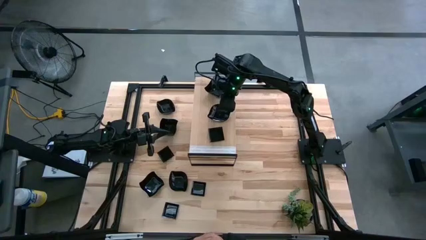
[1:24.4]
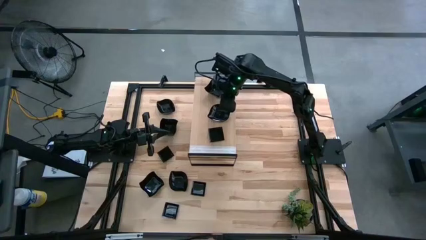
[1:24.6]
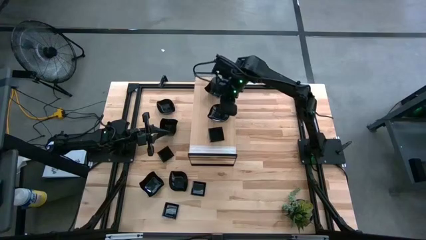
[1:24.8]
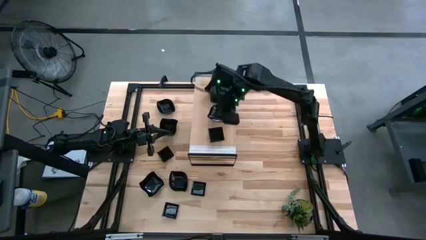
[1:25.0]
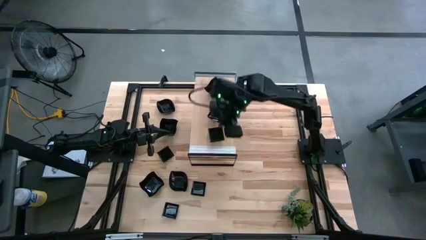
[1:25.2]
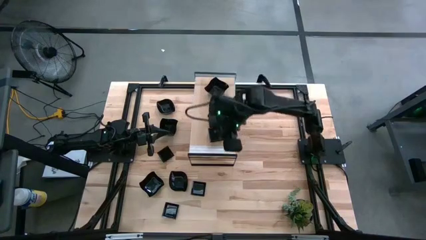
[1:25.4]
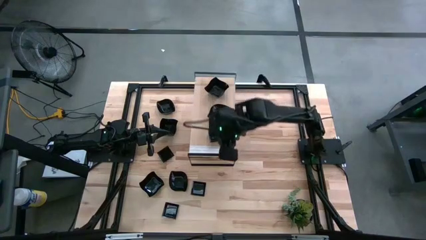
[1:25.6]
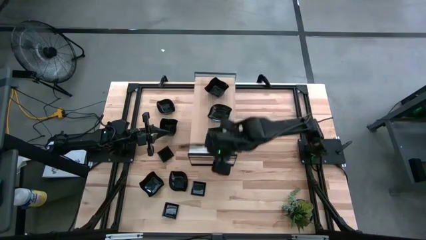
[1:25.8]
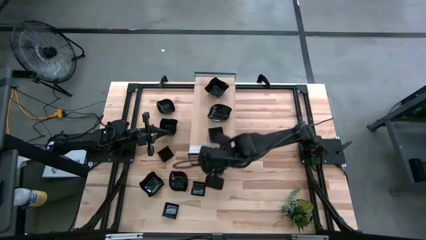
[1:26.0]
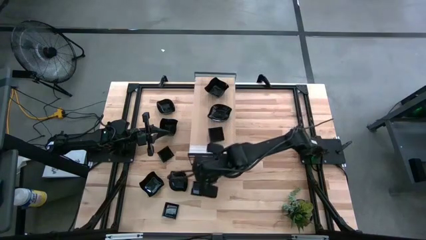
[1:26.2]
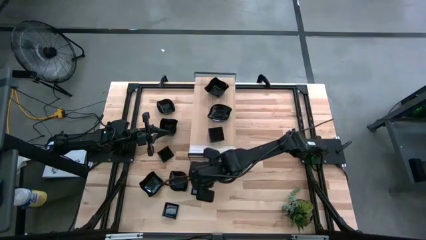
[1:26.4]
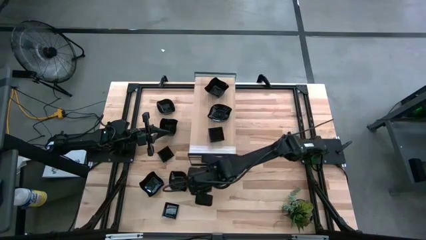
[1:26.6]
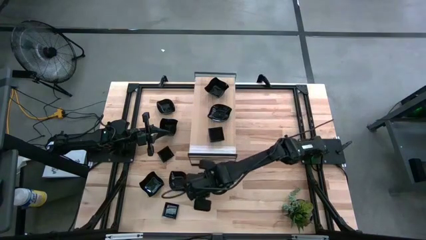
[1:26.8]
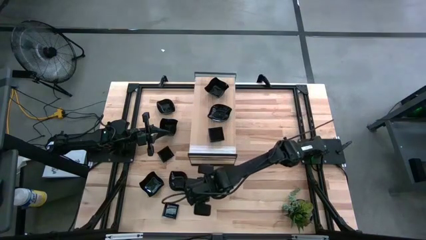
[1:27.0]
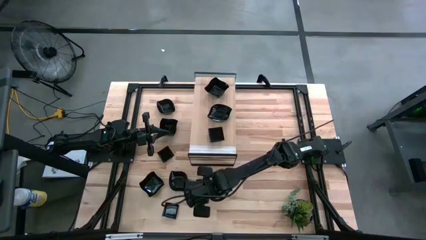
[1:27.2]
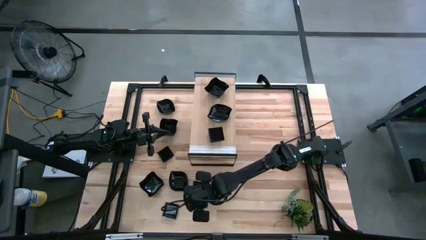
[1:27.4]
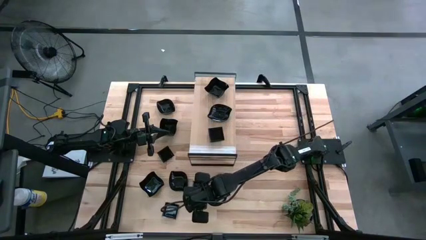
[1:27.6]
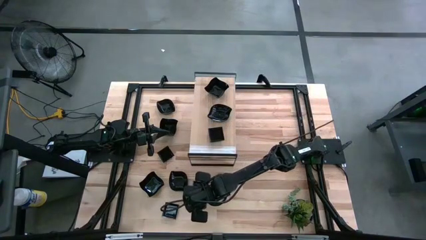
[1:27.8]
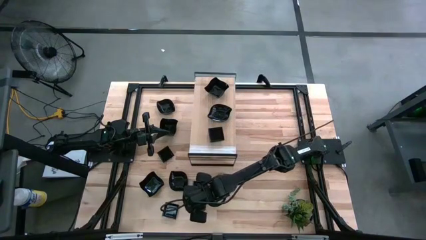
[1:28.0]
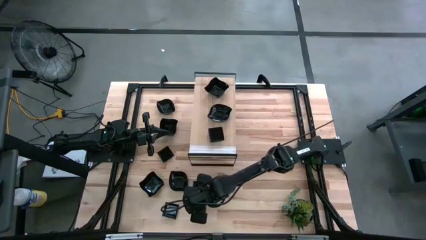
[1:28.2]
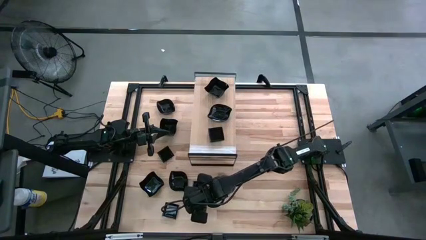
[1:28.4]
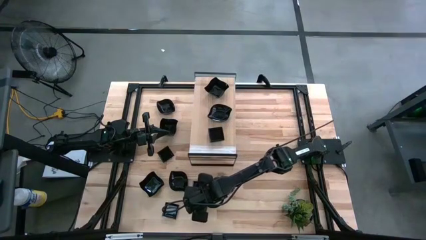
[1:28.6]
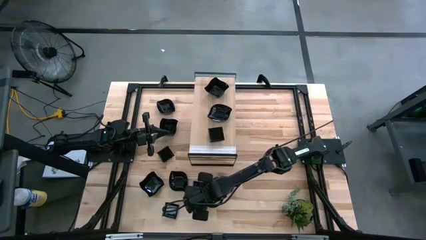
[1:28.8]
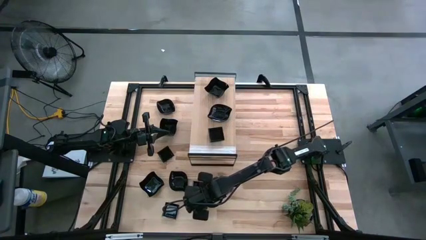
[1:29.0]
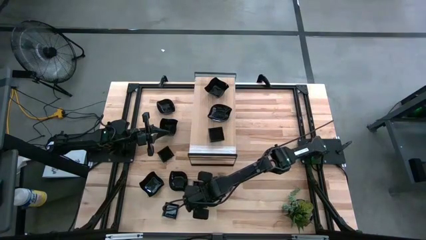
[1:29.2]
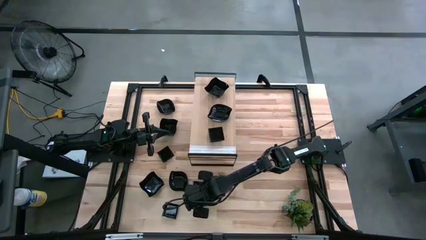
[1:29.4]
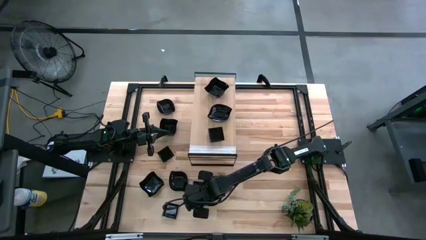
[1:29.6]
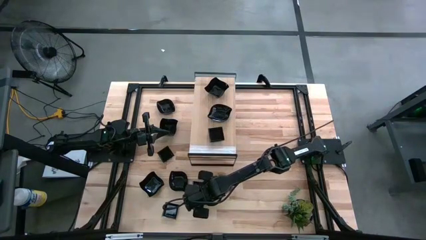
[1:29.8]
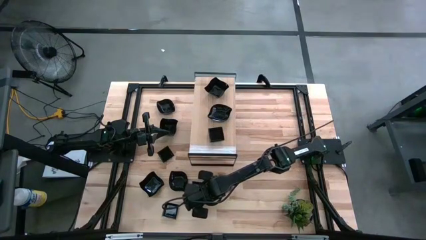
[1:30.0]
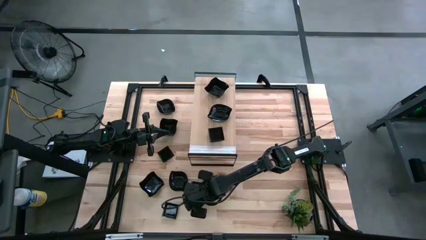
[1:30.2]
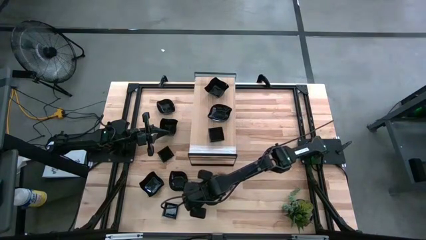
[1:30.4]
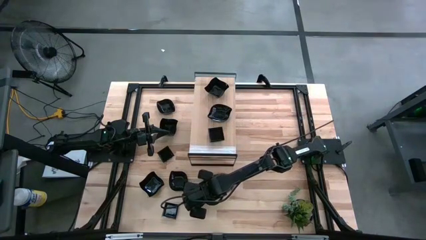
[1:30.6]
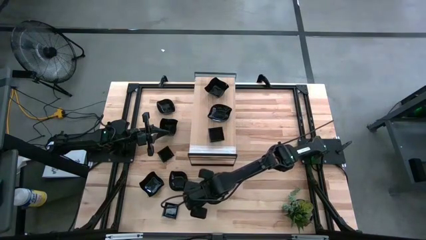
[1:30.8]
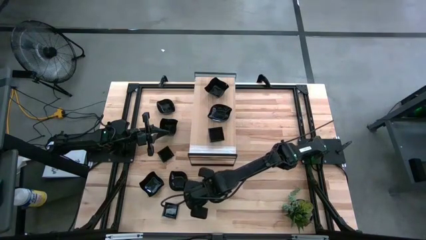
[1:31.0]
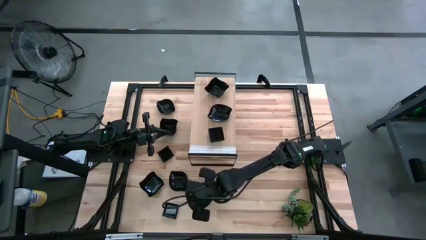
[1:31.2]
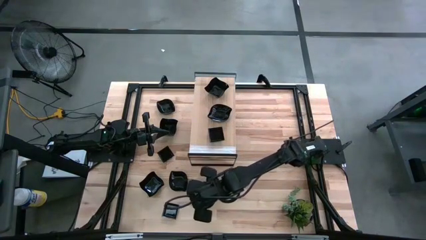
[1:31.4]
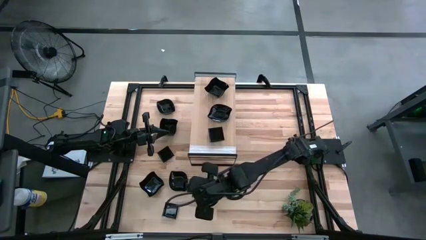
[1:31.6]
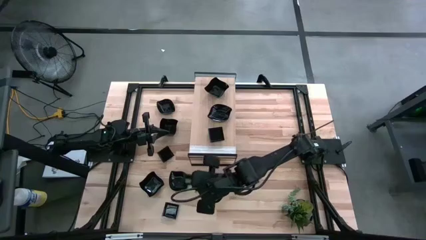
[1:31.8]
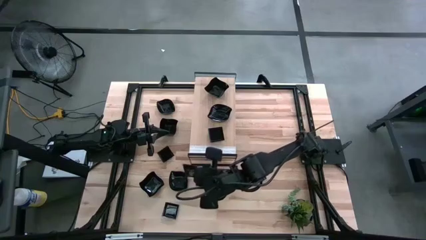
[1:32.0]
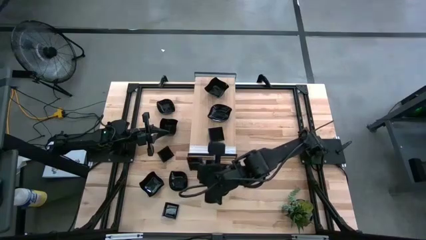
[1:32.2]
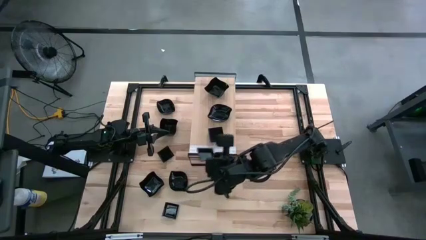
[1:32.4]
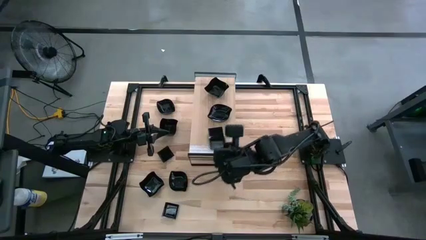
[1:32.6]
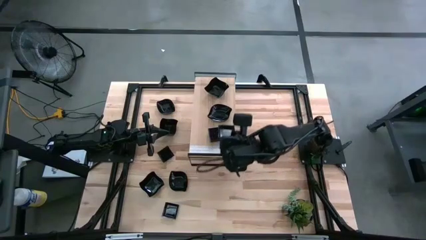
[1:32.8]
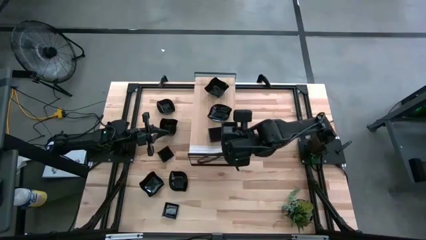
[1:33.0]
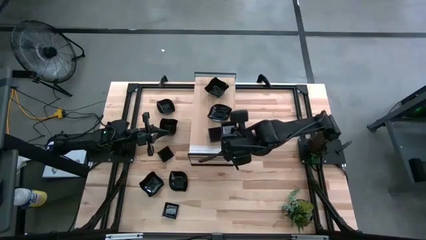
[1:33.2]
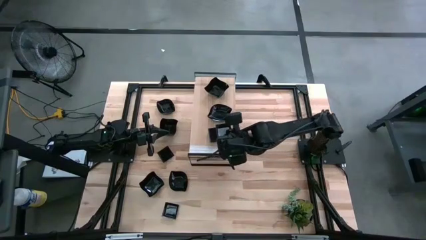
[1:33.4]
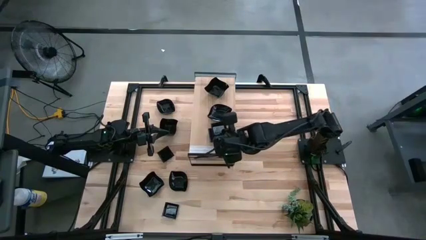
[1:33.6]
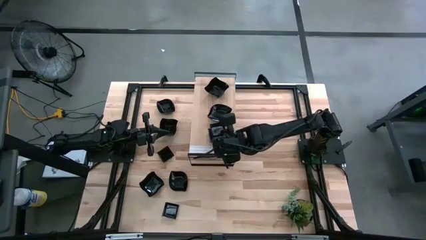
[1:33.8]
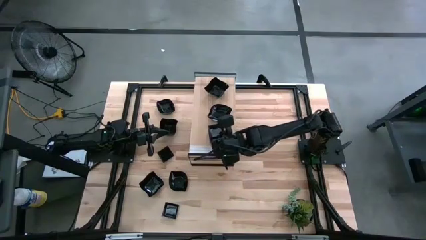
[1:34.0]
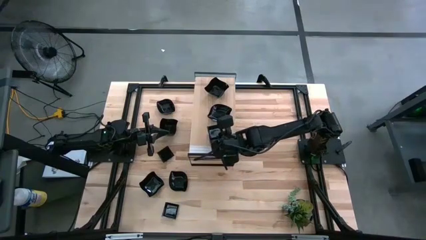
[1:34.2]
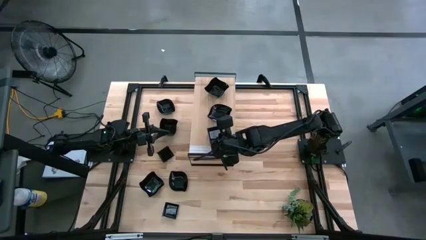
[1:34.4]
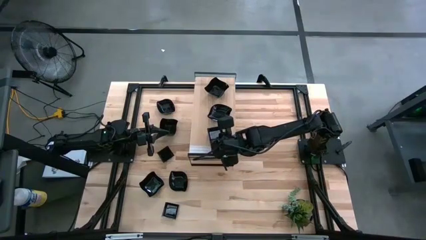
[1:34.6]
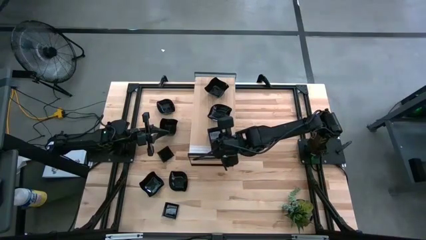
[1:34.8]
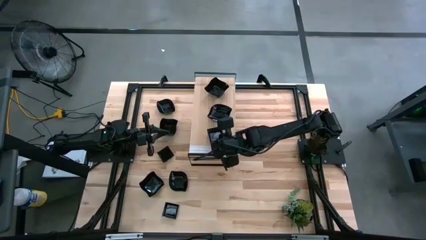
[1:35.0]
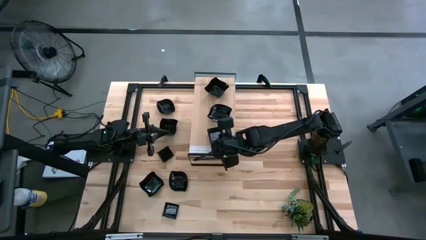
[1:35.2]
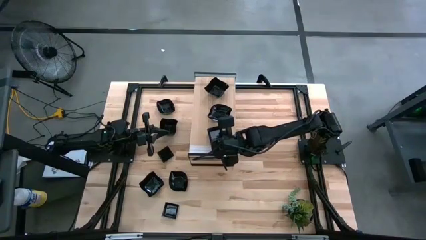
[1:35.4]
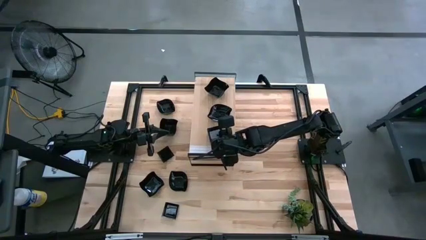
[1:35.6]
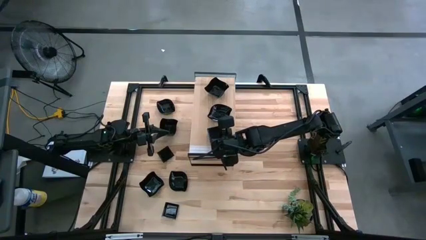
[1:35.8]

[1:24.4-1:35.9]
Task: Pick & Place Mini shaped plates
Stack the square-shaped plate on top of the stacked square-shaped plates on the shelf

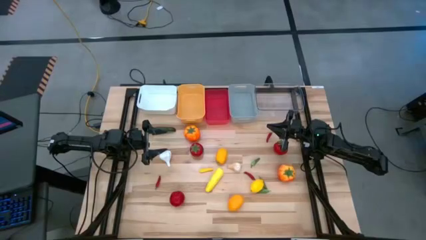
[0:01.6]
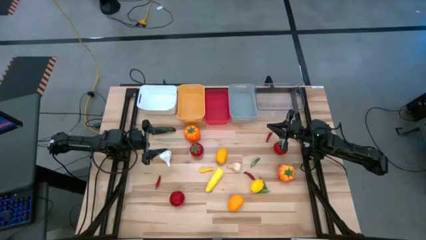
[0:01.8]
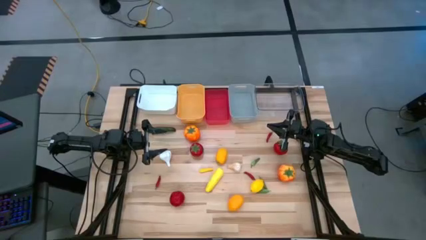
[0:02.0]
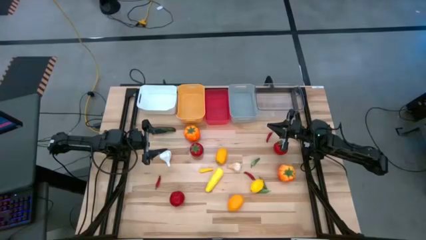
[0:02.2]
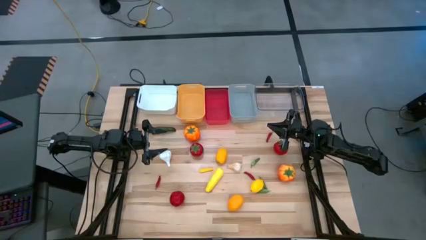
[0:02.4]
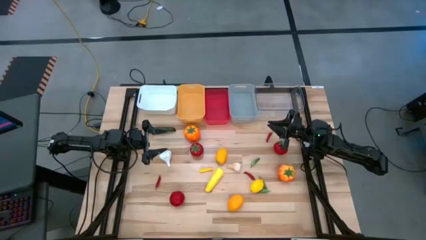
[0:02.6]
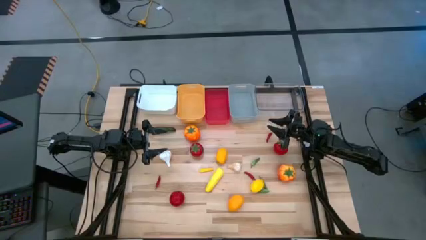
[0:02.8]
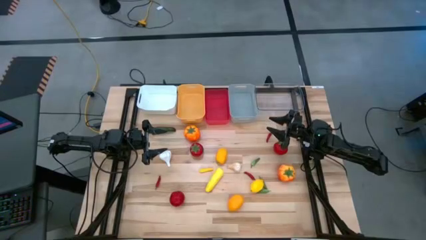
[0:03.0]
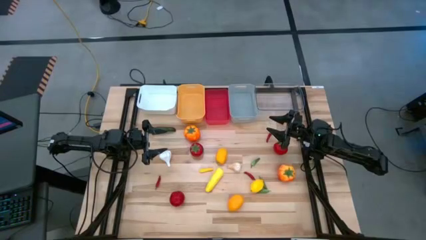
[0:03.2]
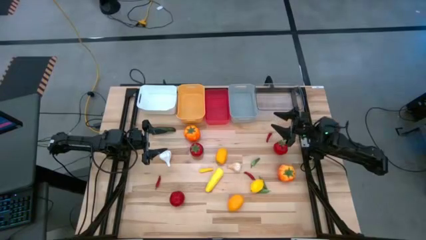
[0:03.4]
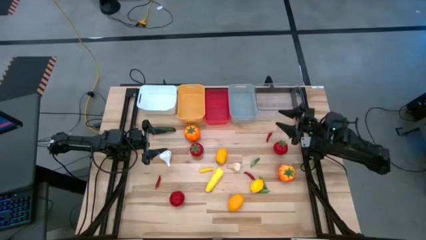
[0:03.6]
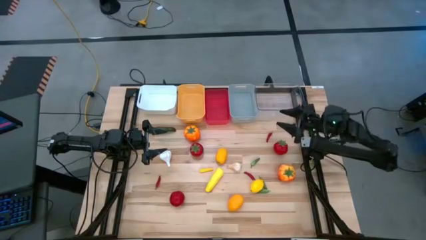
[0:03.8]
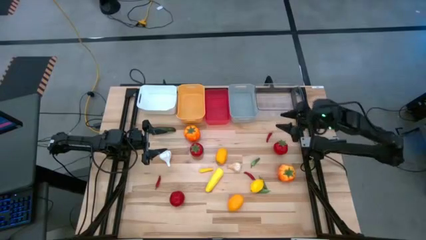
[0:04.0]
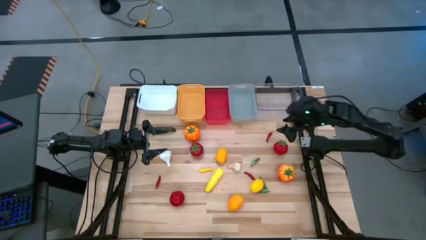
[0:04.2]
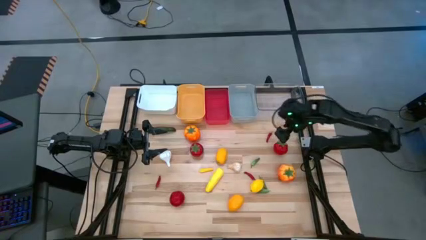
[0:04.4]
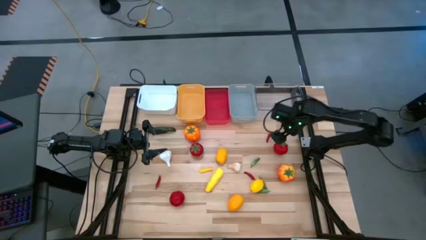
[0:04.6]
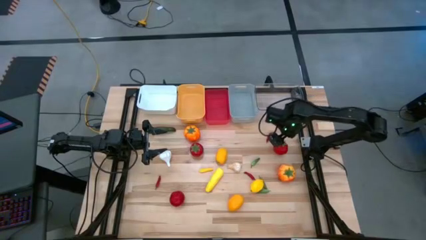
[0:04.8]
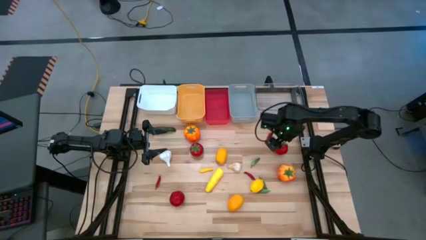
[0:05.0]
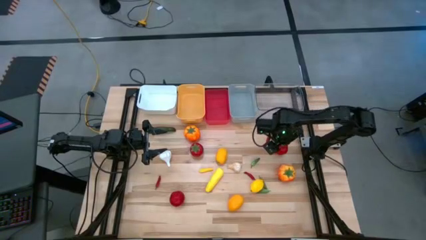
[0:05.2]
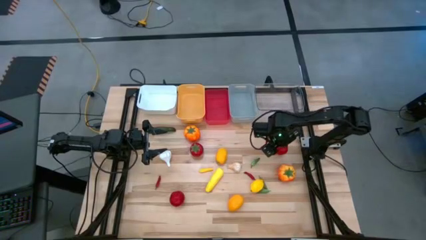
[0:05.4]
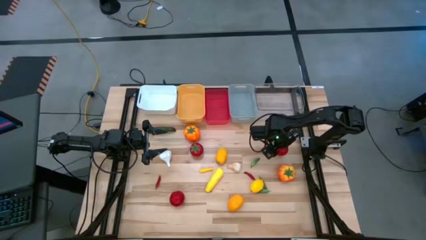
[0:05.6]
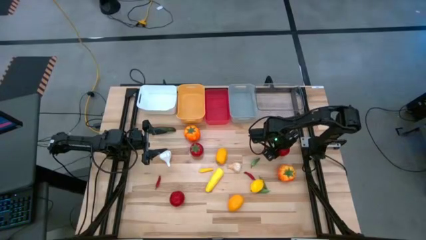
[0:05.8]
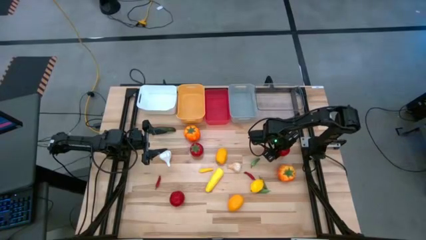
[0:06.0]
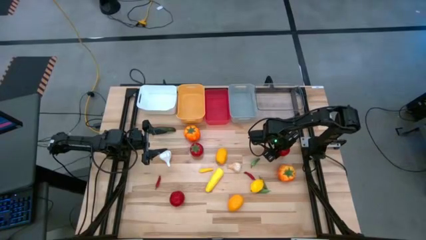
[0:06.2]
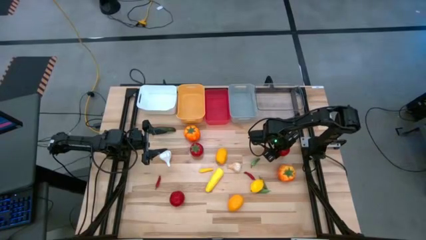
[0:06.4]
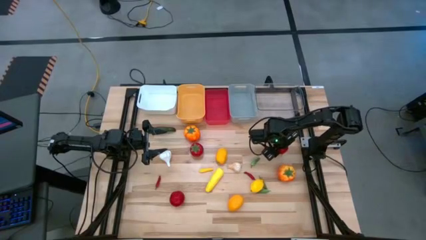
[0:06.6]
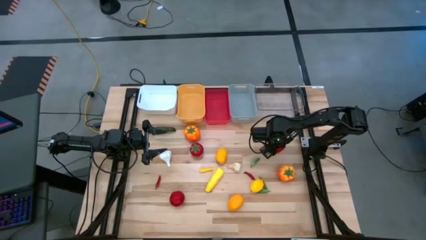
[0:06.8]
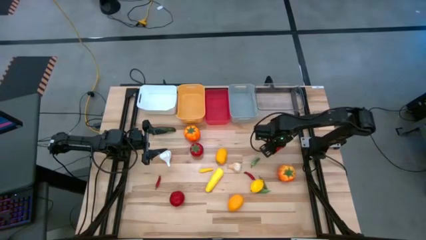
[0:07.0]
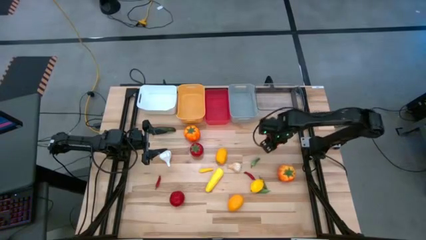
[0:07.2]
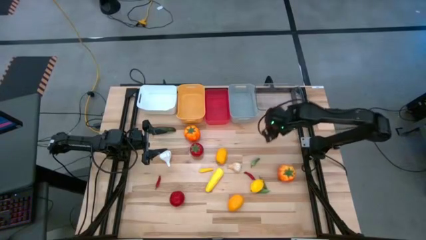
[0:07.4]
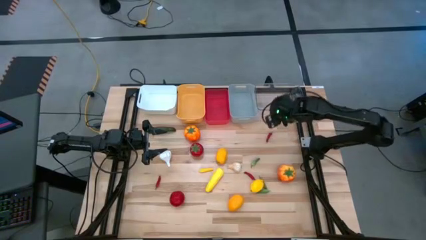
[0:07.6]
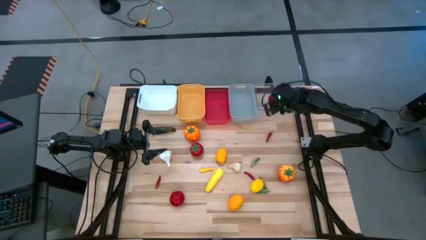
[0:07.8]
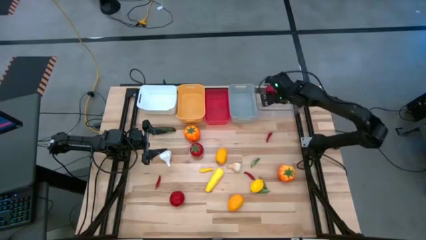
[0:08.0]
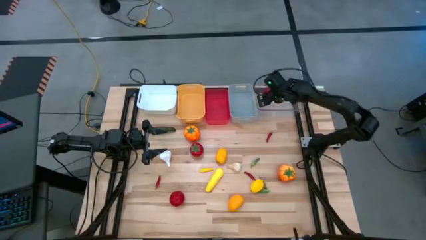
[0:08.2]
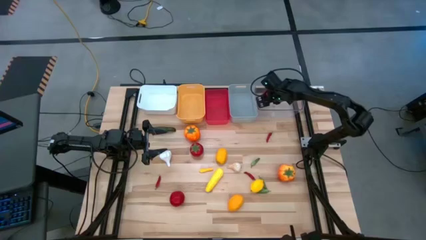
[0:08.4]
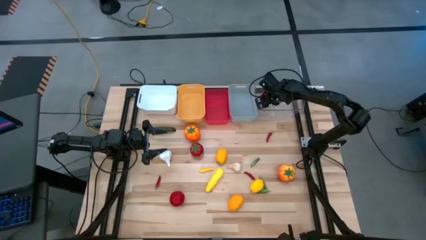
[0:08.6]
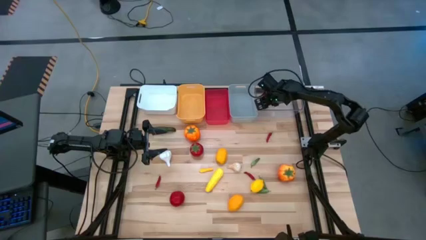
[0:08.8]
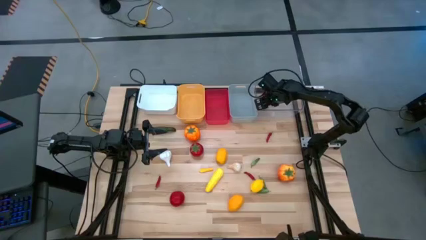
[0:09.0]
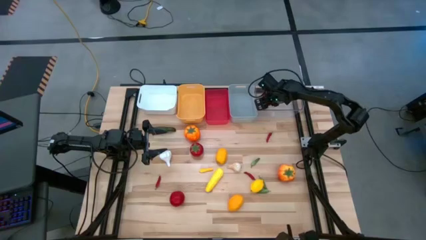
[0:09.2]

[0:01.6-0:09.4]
Task: Sort produce into baskets
Put the red tomato into the transparent bin
